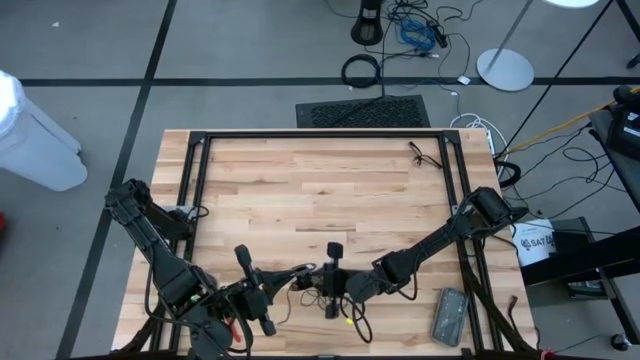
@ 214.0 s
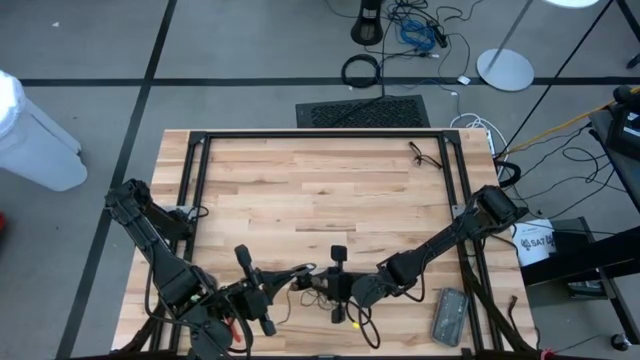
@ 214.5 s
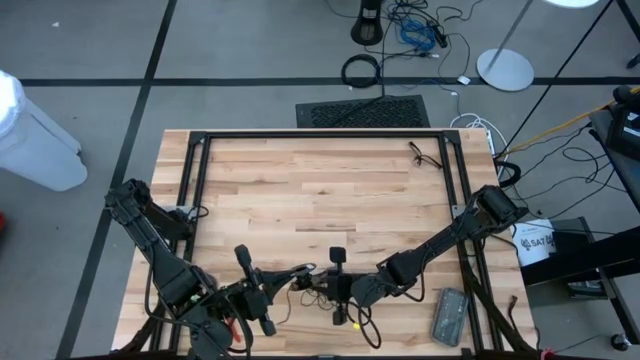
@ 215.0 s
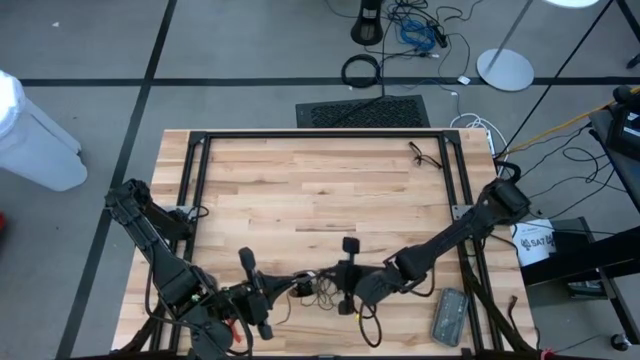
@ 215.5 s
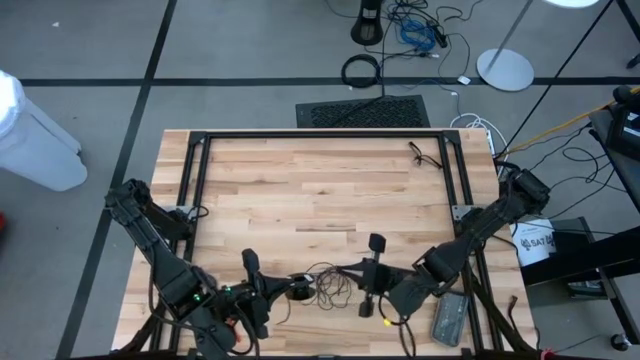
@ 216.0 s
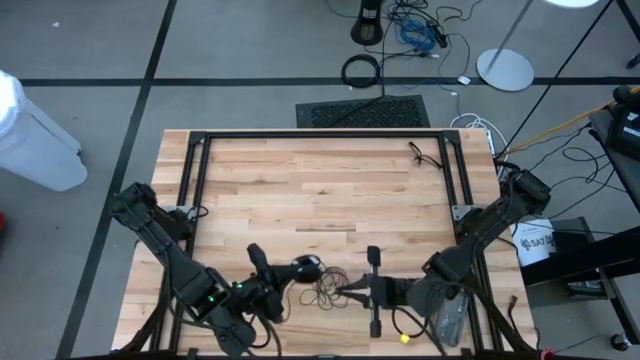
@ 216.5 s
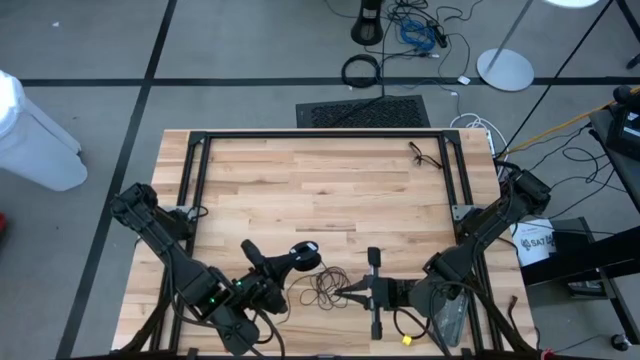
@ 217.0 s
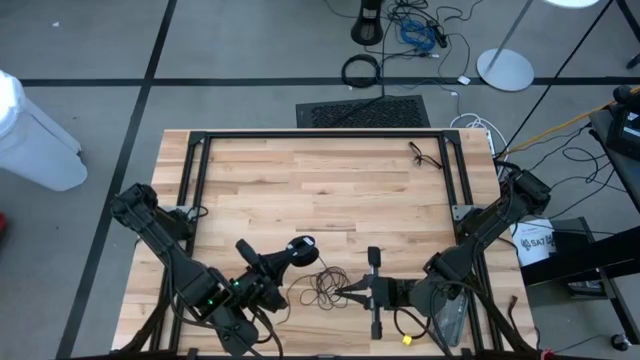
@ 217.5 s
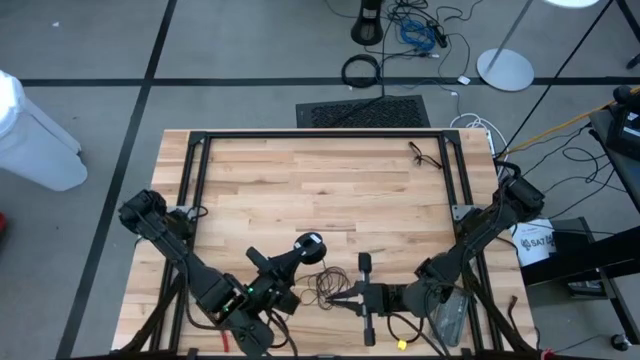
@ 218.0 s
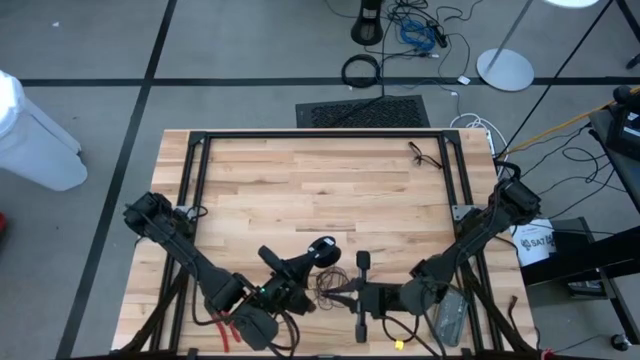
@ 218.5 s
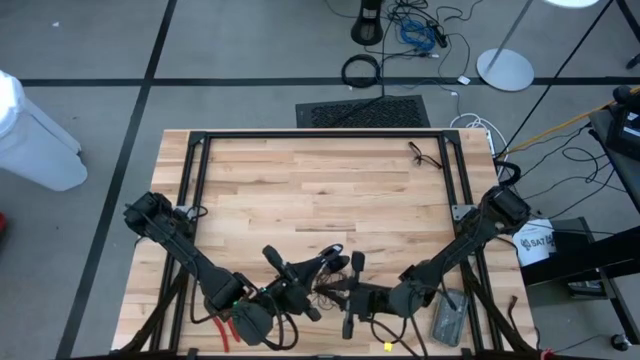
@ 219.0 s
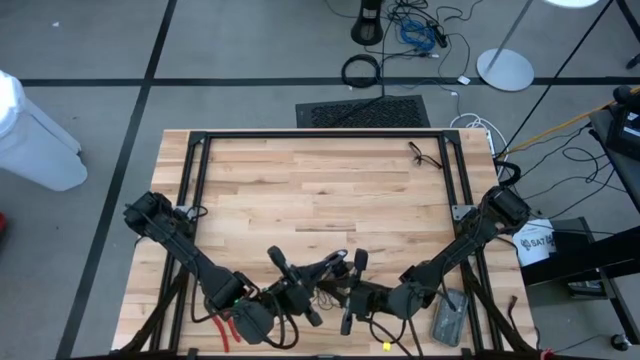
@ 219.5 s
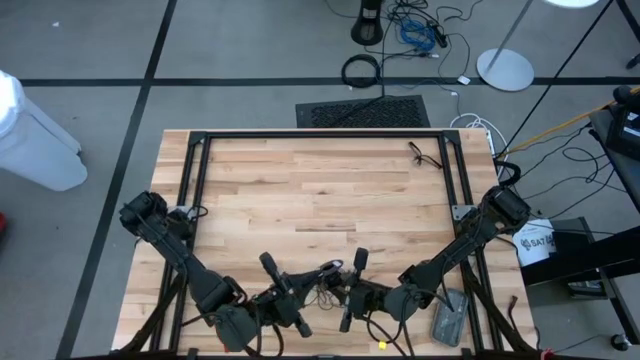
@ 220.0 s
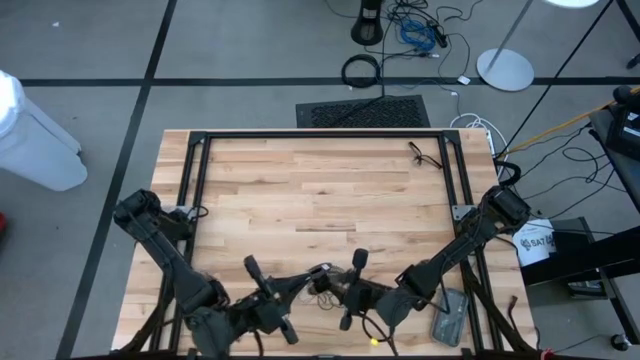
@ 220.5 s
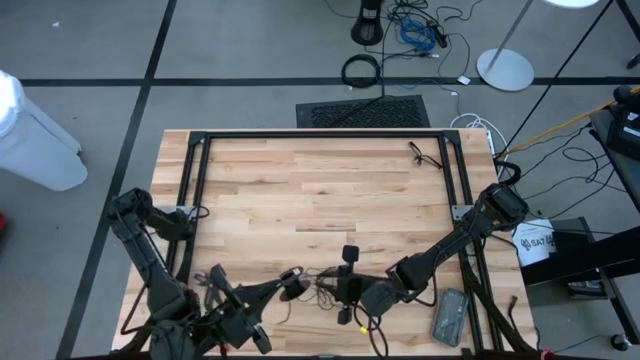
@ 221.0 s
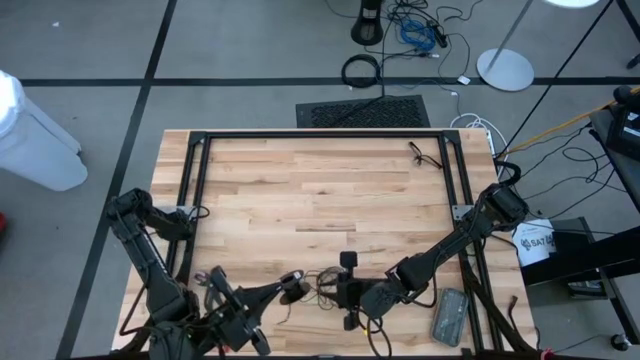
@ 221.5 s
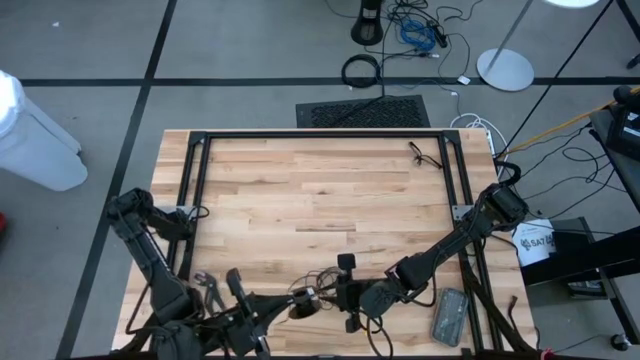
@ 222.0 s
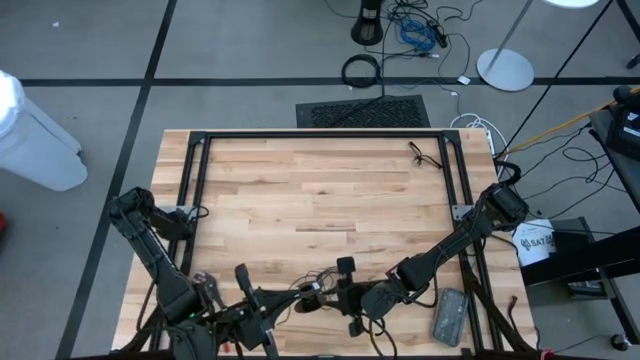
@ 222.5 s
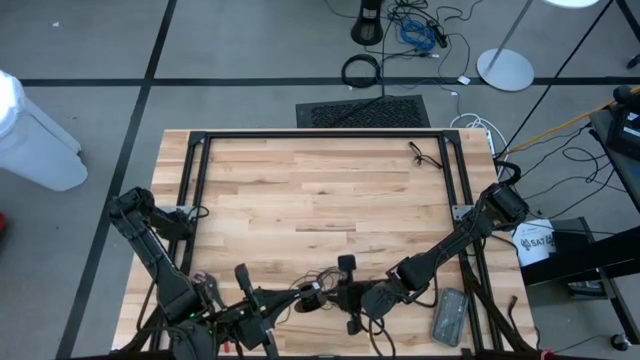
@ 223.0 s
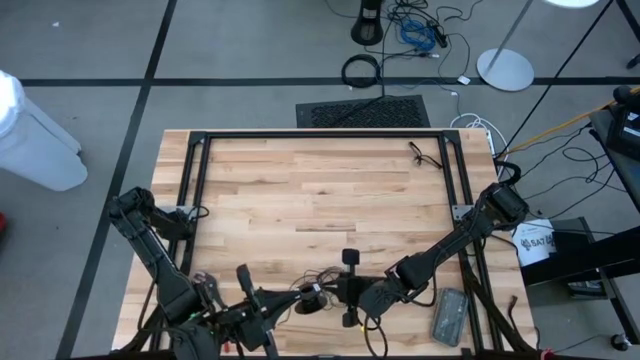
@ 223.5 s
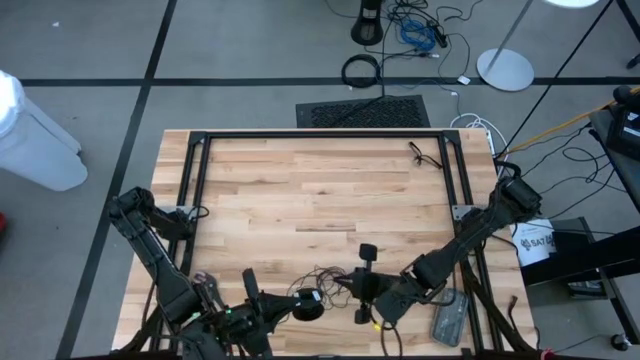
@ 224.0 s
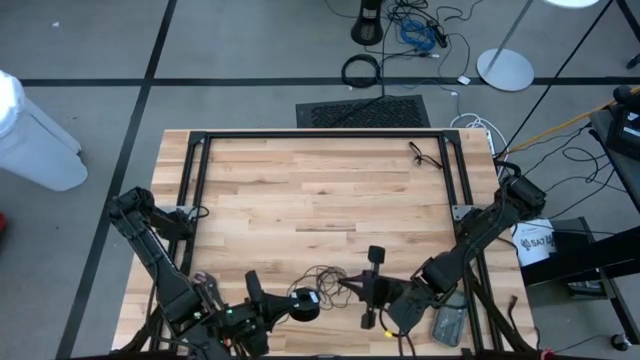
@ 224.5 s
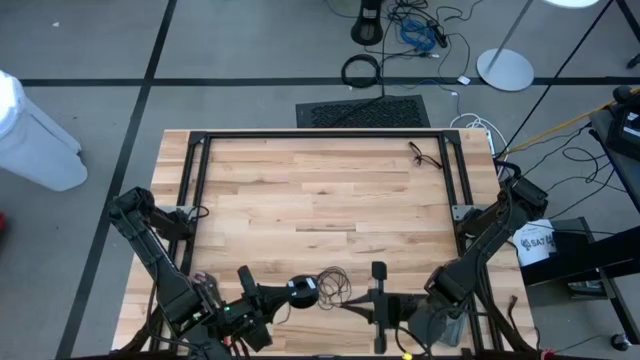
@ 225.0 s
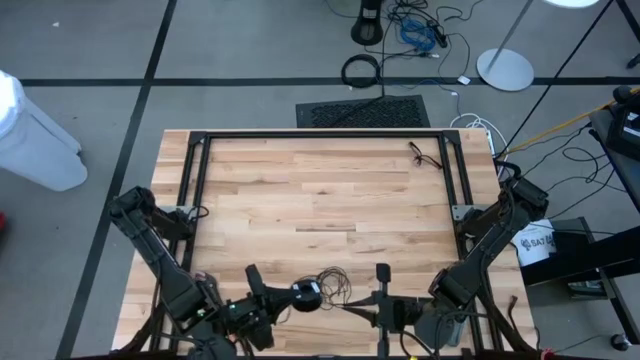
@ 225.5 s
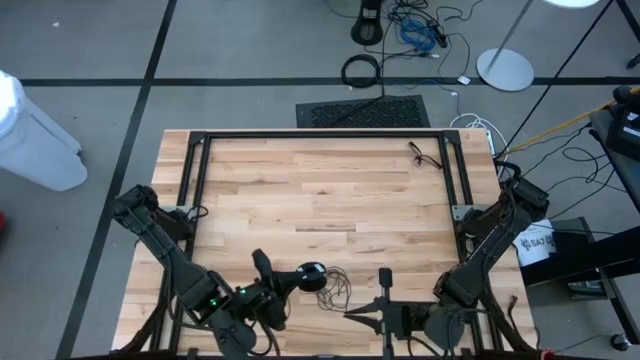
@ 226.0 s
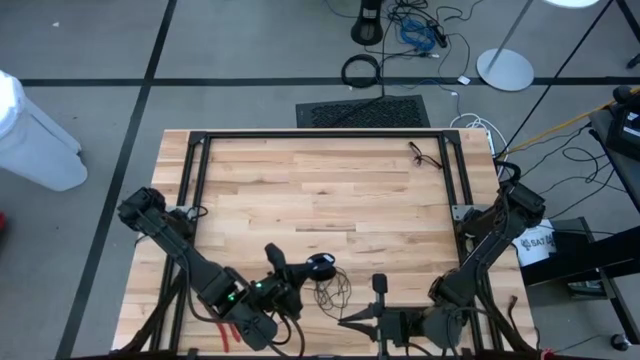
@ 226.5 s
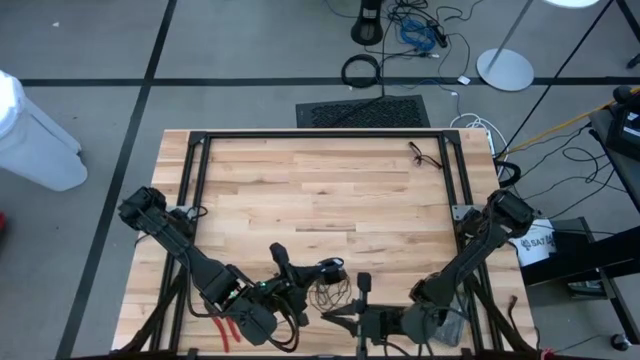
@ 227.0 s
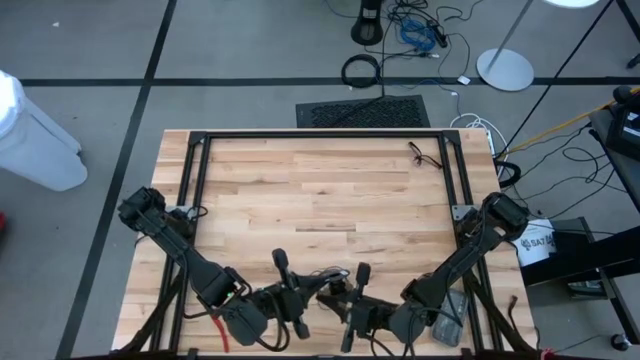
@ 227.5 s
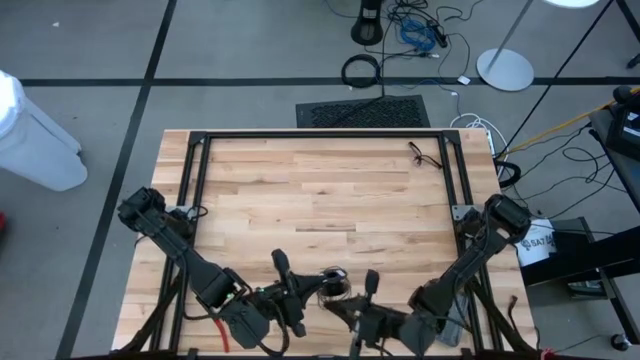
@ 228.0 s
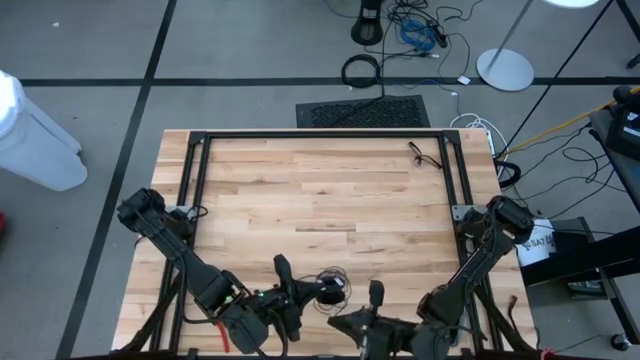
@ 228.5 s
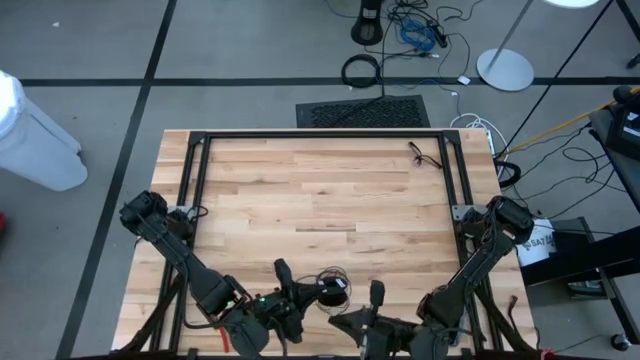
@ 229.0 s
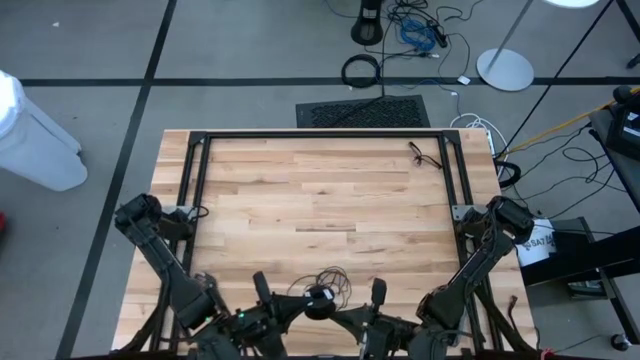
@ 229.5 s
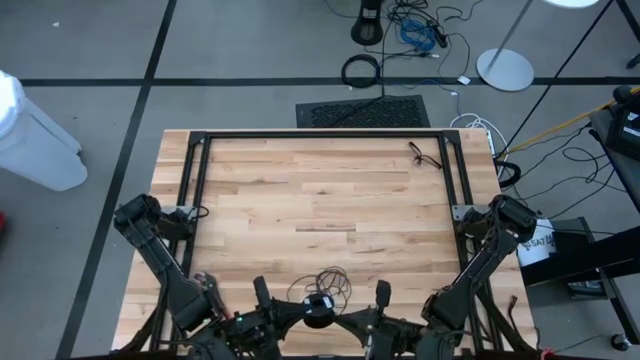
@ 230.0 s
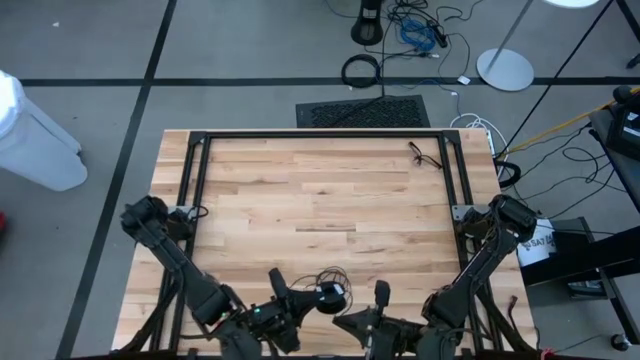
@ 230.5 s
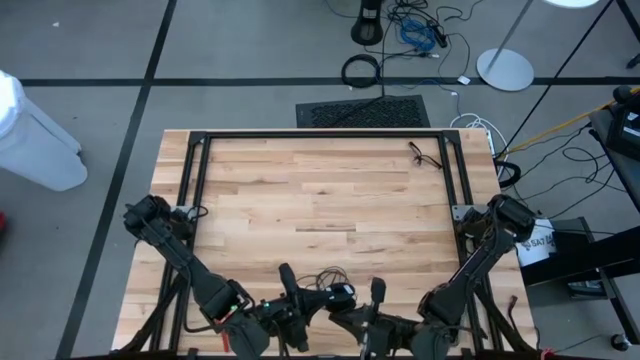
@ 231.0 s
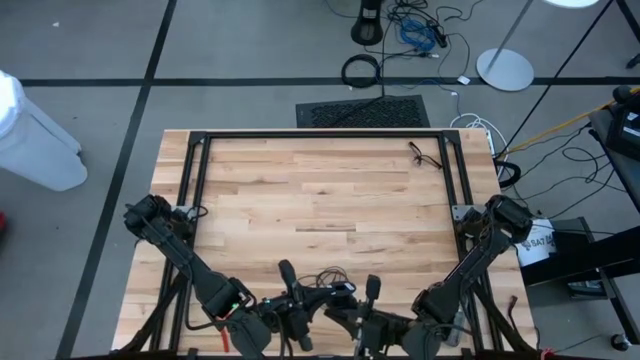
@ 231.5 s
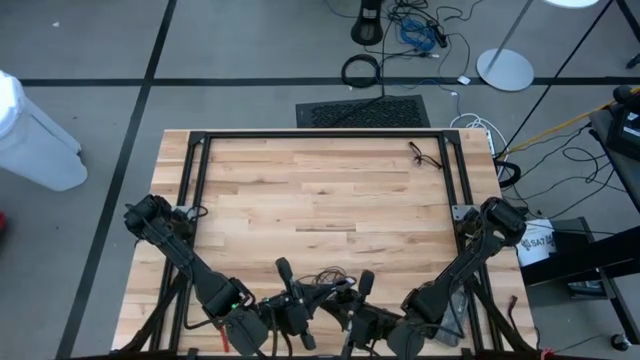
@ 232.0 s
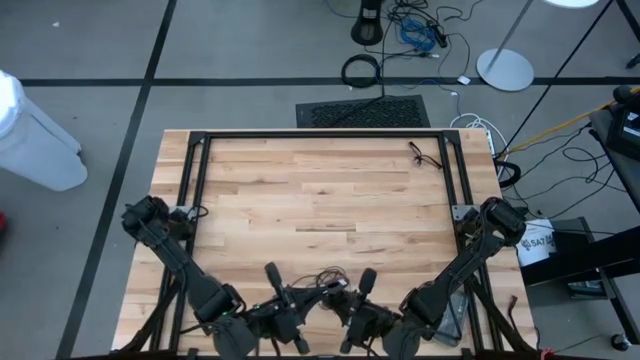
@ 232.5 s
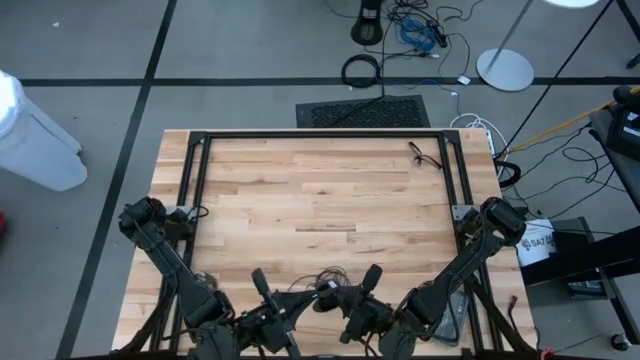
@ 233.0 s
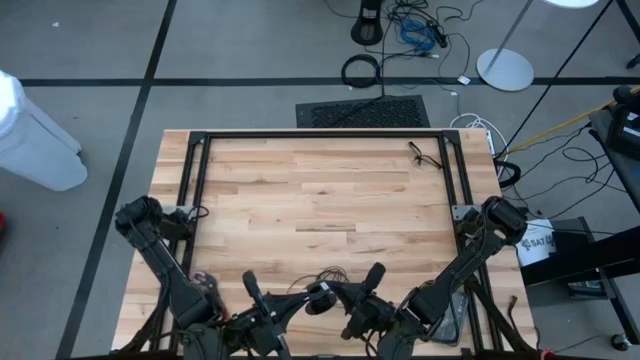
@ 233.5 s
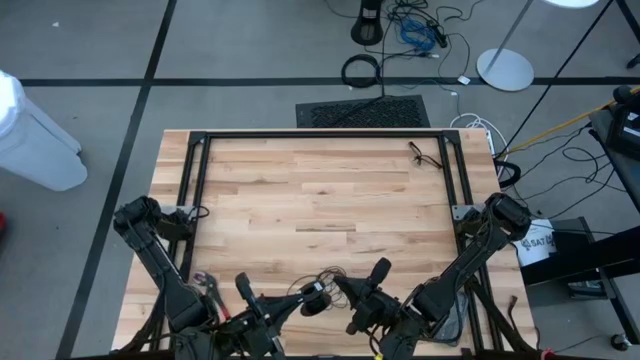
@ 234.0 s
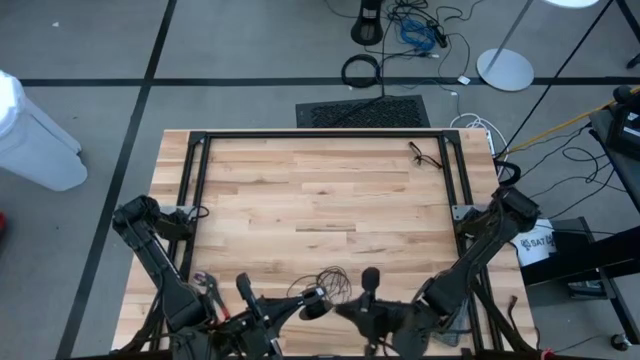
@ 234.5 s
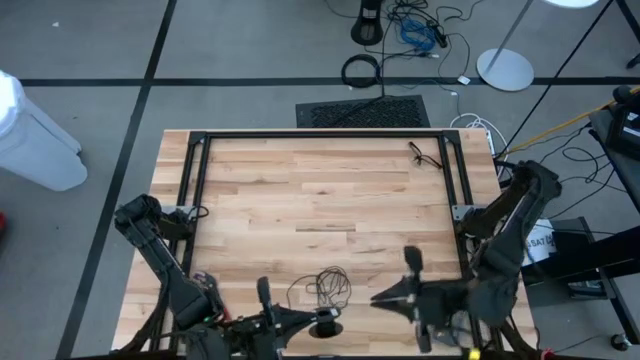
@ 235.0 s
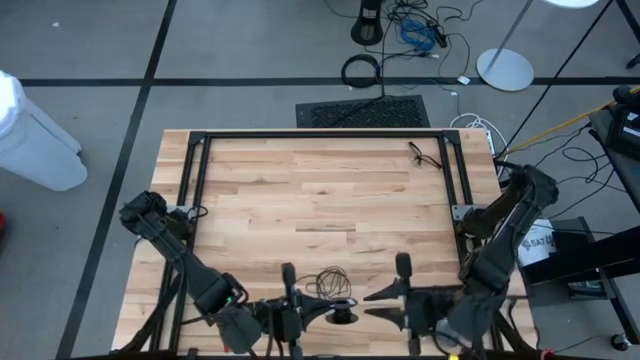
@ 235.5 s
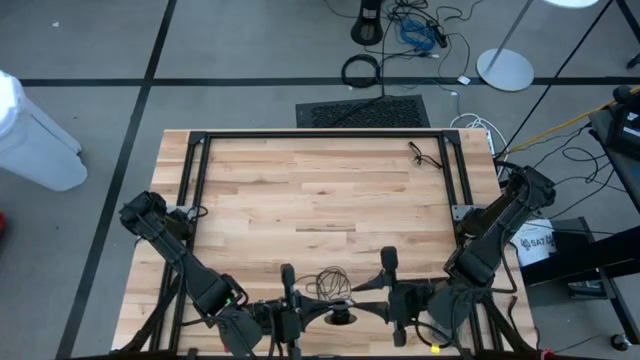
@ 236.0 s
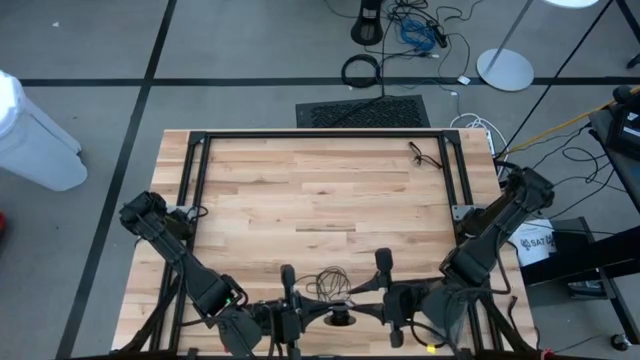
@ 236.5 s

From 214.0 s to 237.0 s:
Task: Coil cords
Coil the black wire onto the black spool
